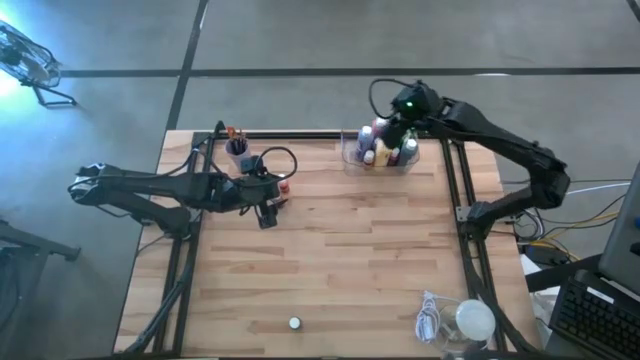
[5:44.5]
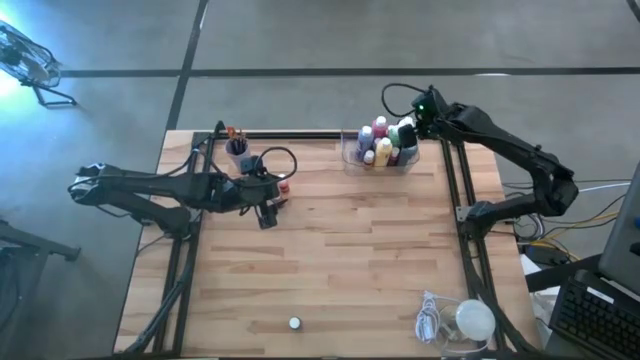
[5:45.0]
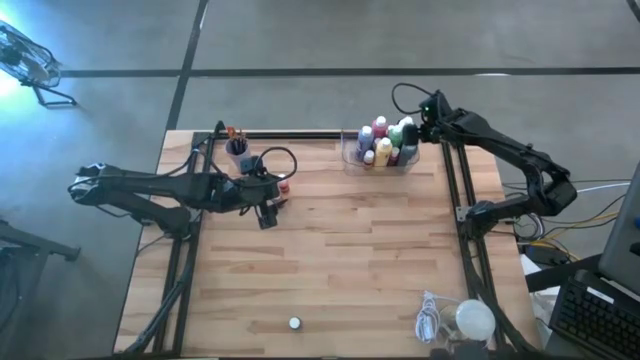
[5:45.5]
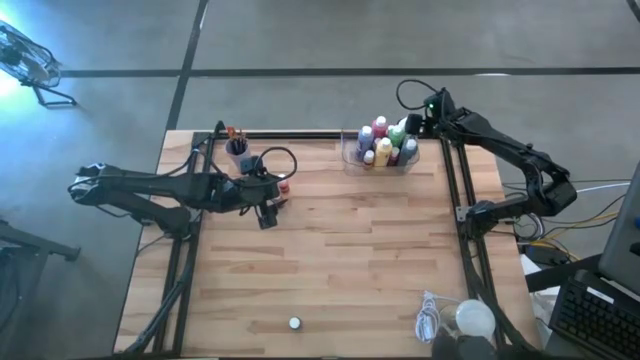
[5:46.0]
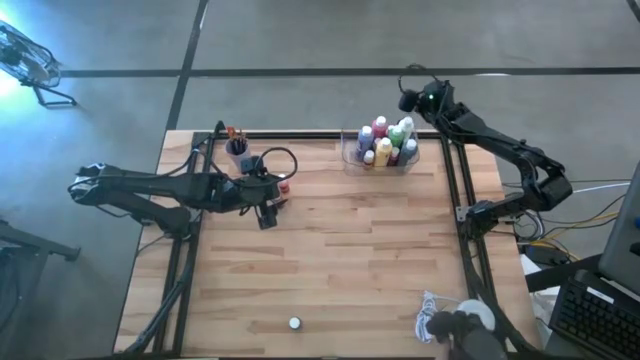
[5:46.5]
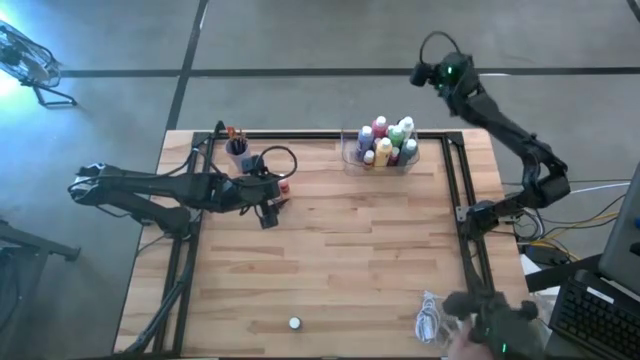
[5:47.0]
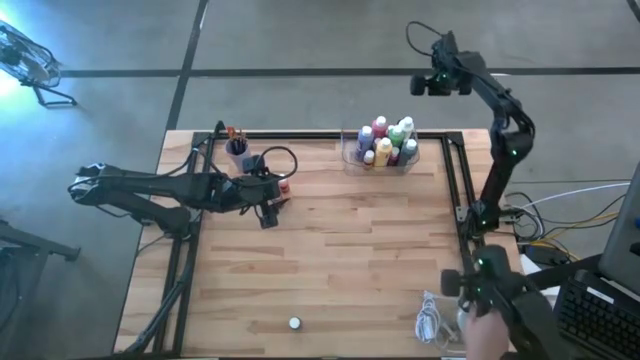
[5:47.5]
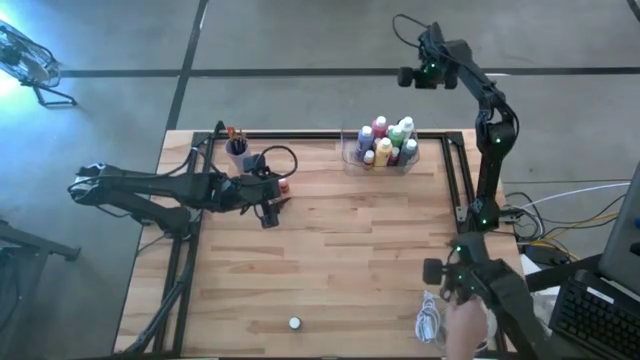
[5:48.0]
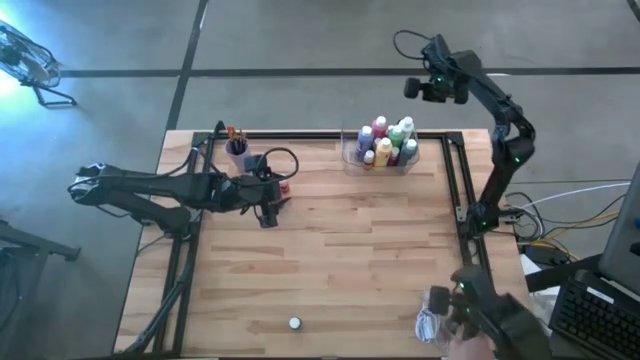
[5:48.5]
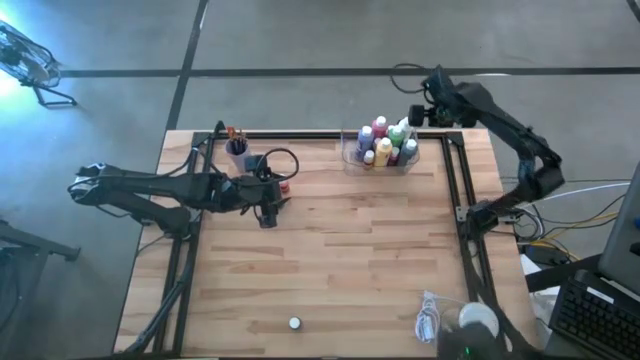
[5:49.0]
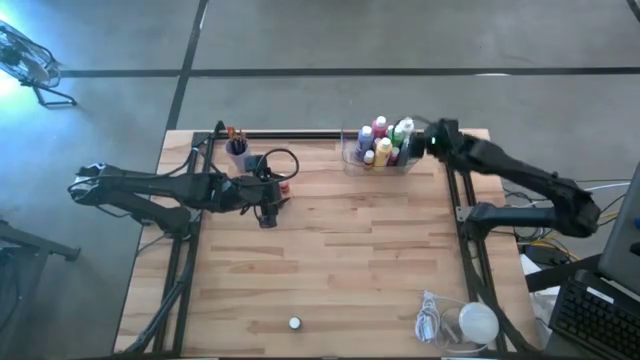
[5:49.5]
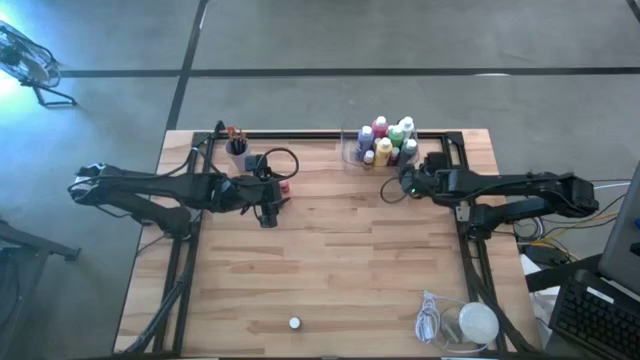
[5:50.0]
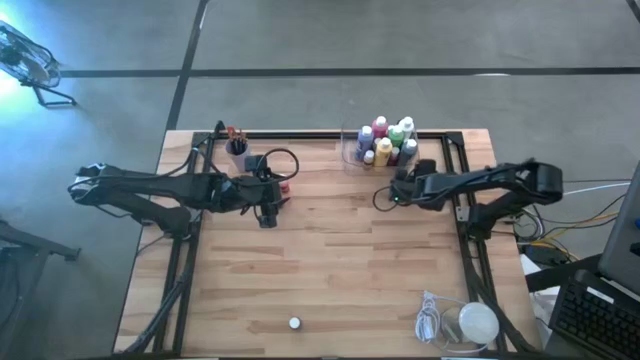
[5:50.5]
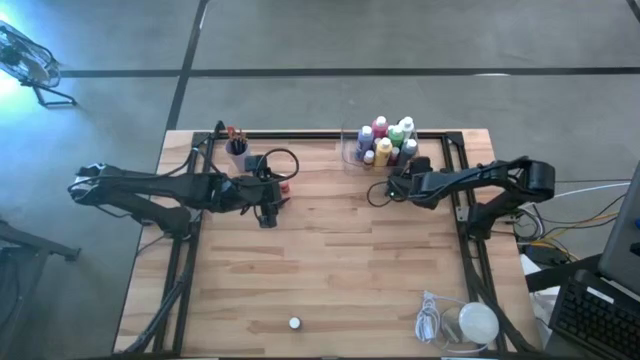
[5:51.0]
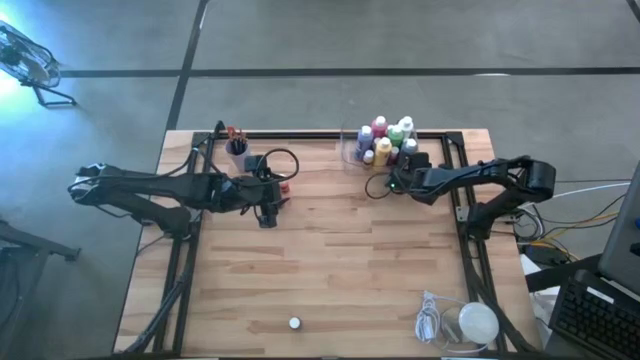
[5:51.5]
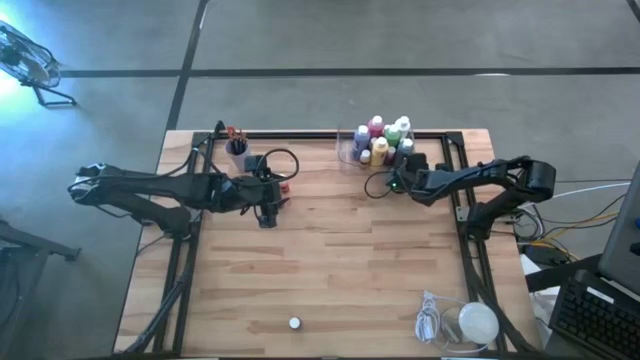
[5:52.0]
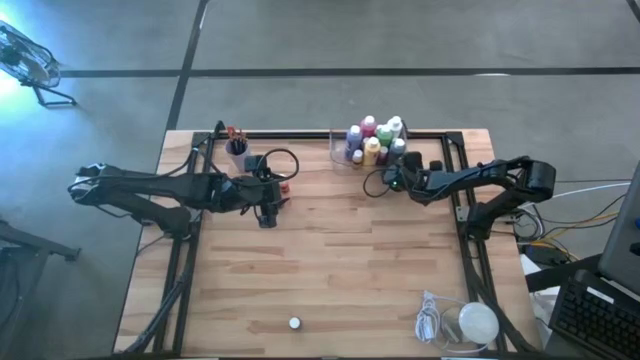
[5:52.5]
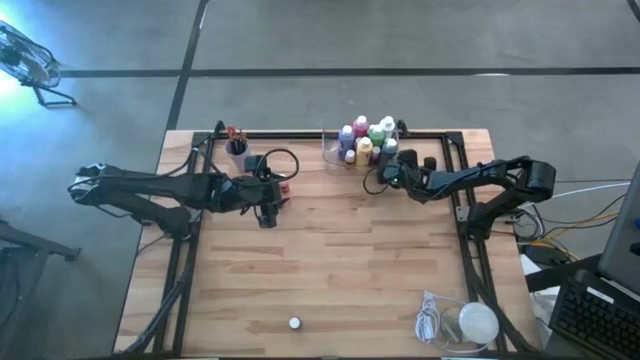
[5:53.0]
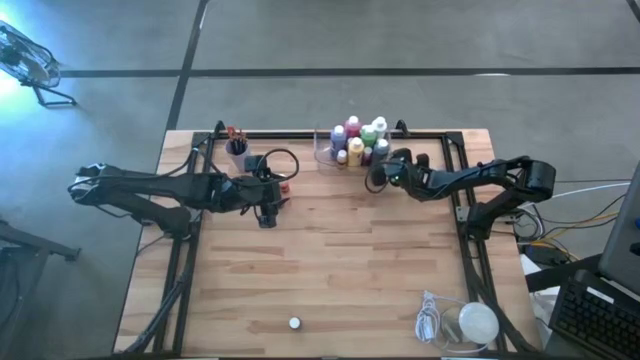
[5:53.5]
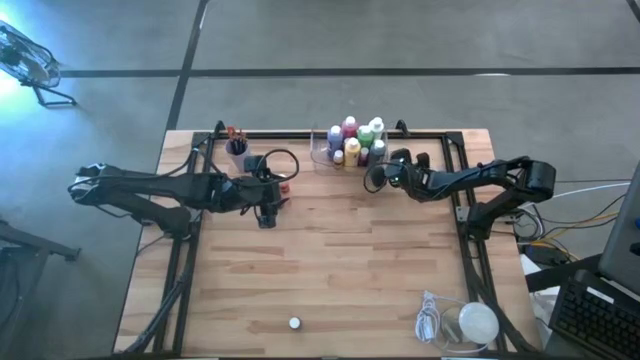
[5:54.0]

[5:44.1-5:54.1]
Task: Pick & Place Paint Supplies
Adjust the transparent bin

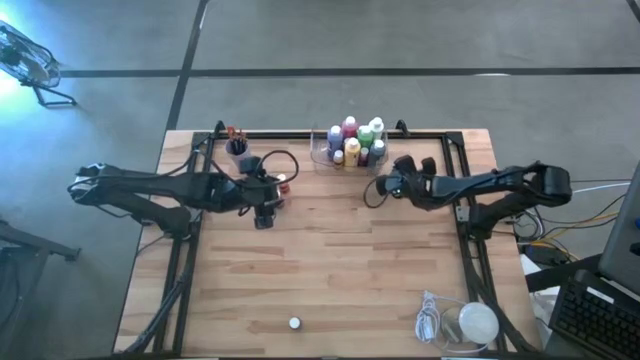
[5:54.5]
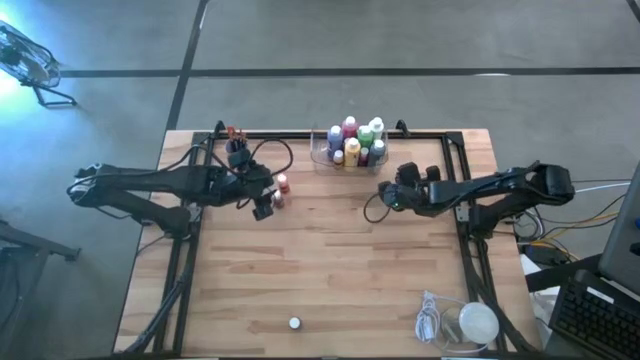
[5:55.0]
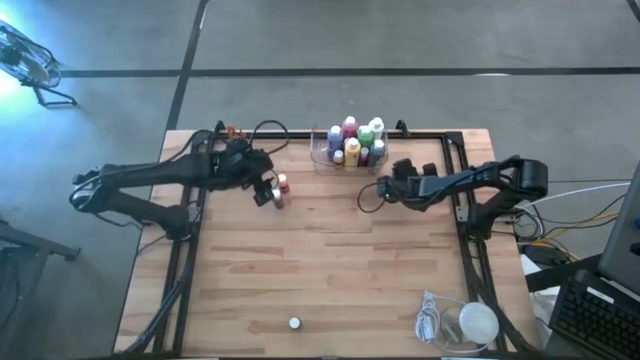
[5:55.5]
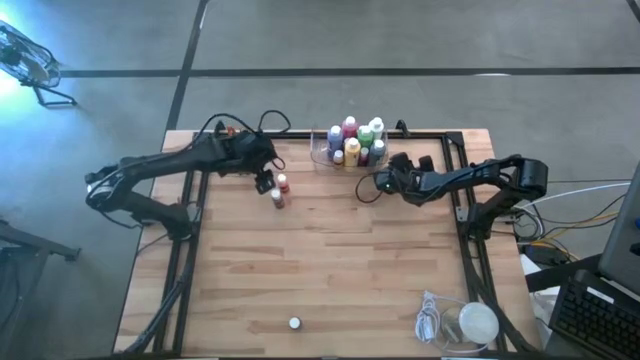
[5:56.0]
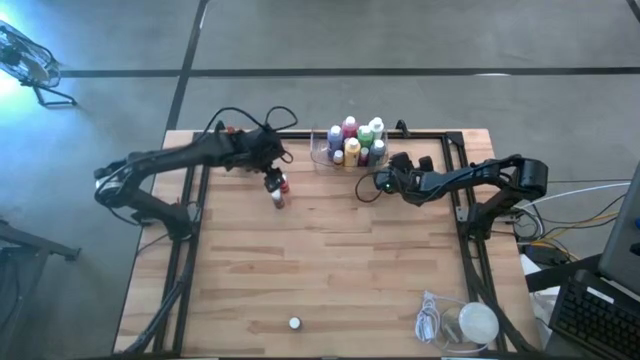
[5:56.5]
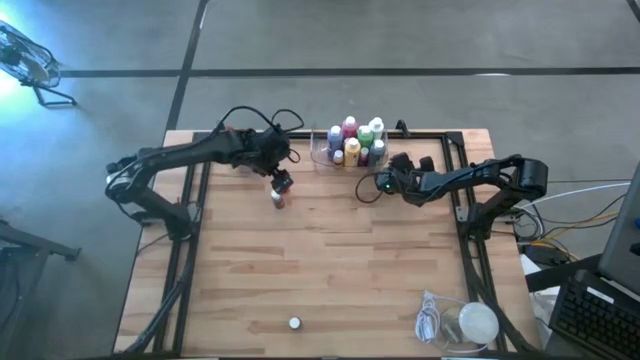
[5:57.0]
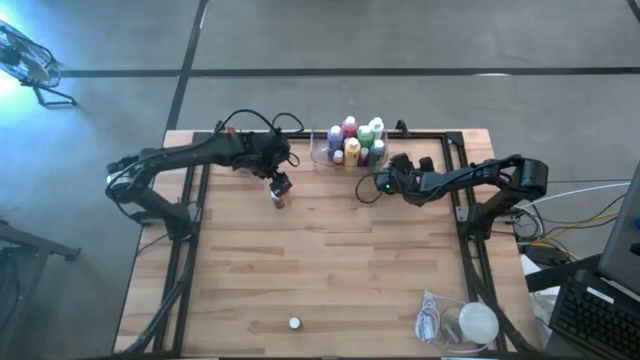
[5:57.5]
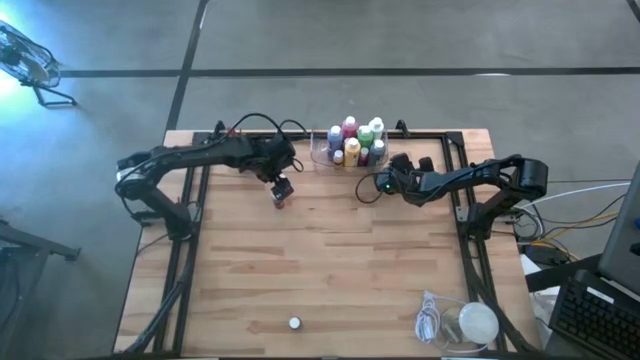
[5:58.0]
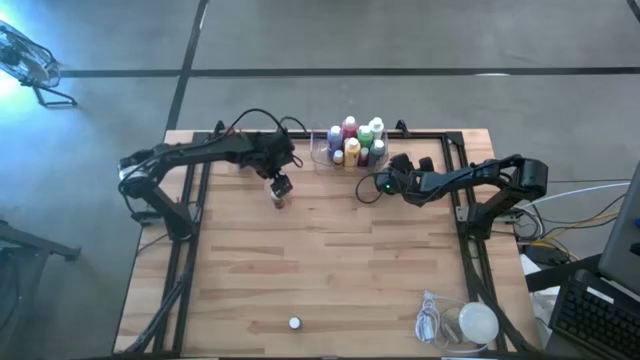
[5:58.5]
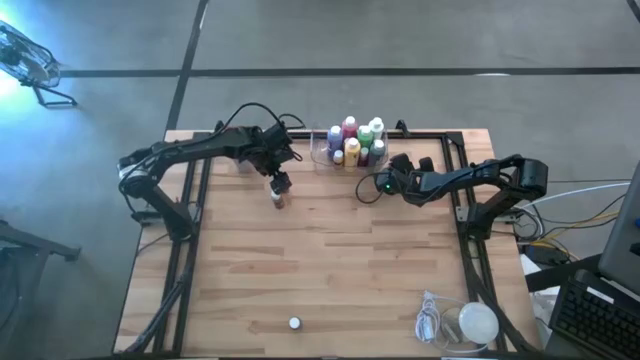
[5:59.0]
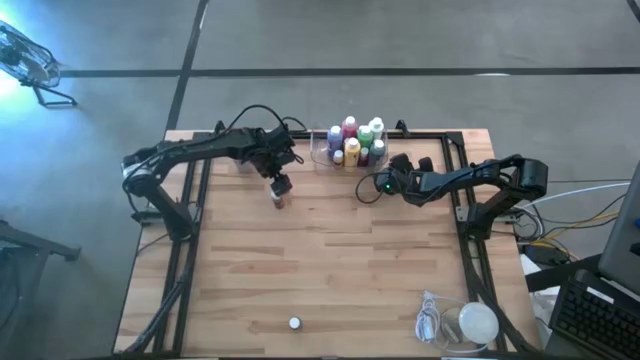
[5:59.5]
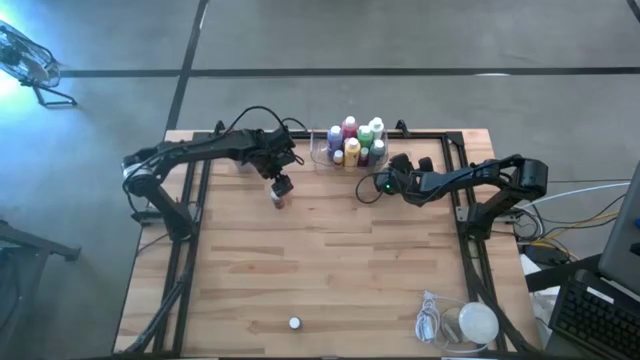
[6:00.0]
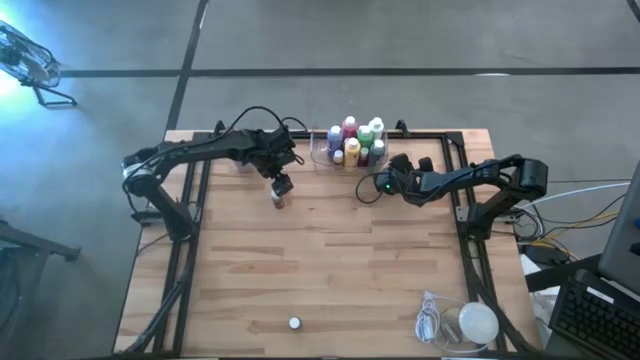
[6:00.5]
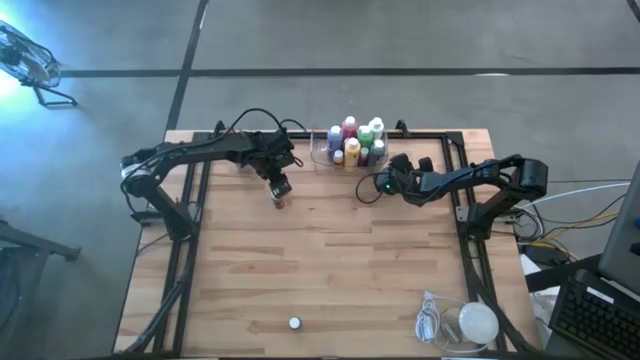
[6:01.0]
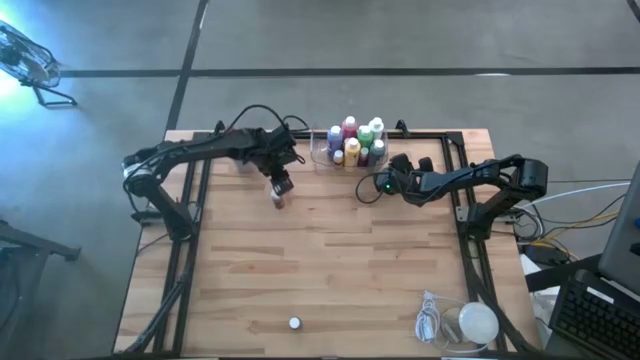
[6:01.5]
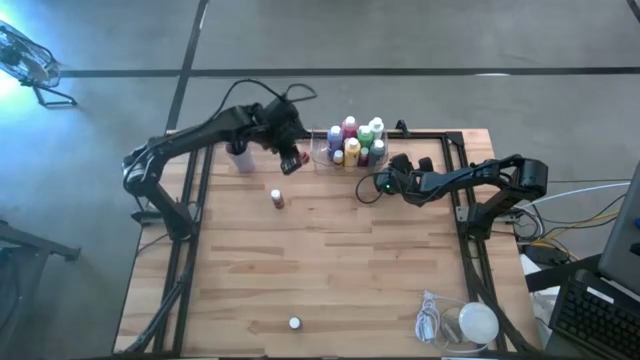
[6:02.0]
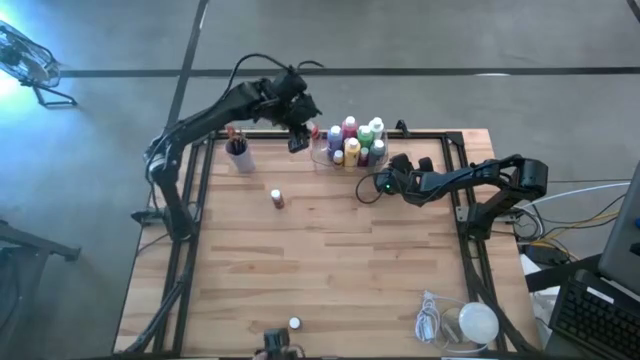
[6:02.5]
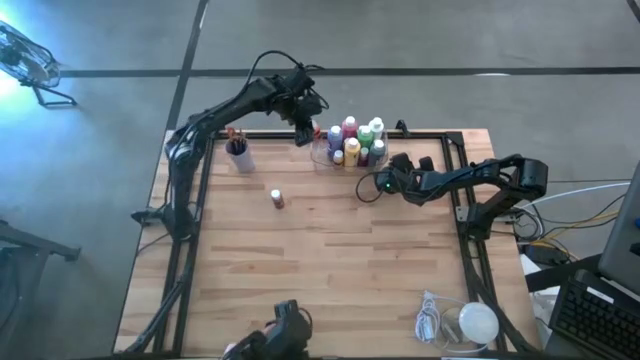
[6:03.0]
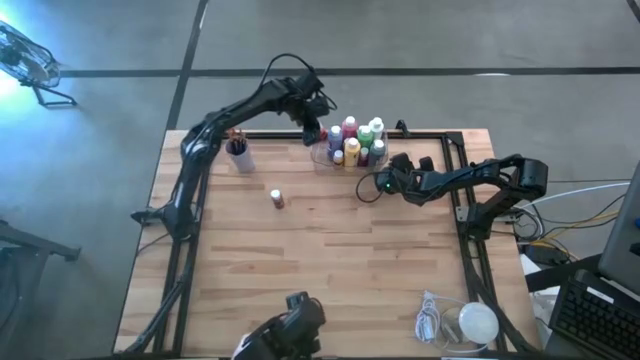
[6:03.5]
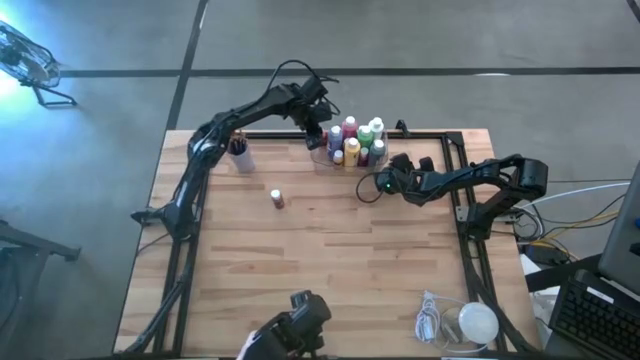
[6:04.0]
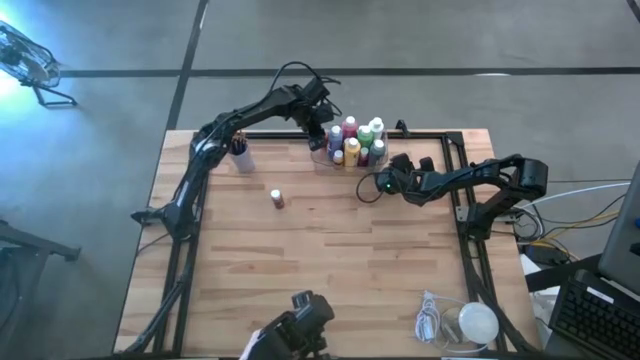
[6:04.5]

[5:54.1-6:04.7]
Put the orange paint bottle into the transparent bin
